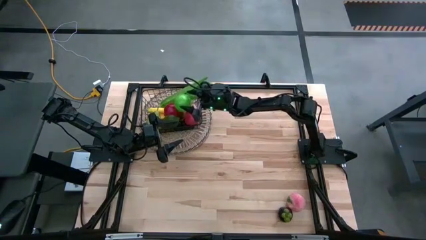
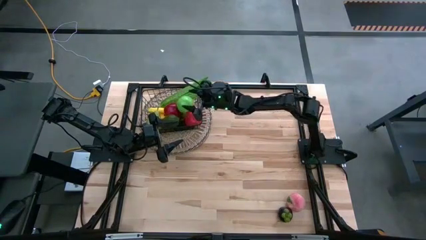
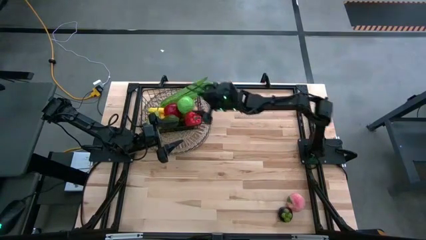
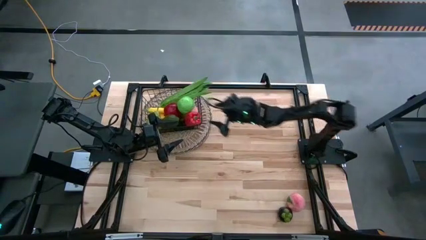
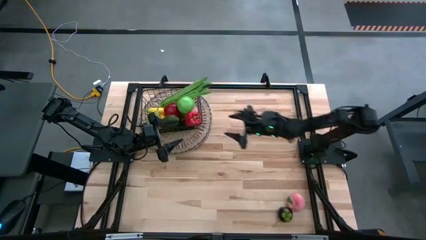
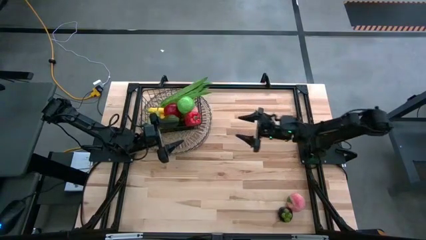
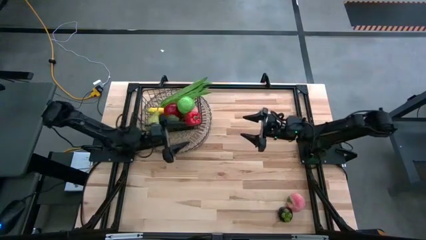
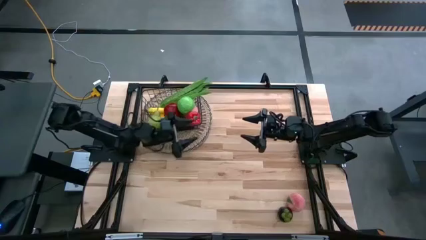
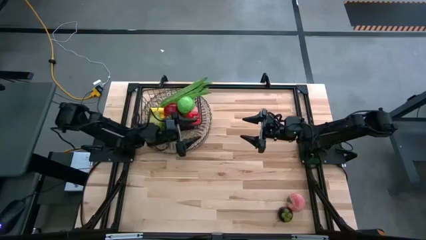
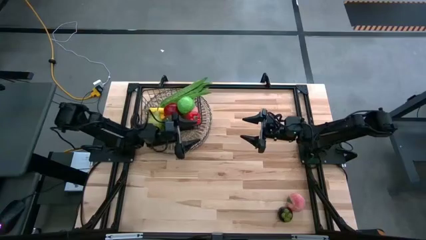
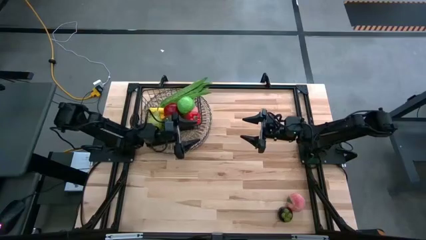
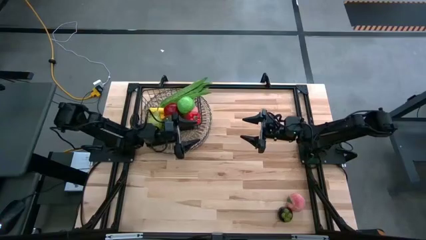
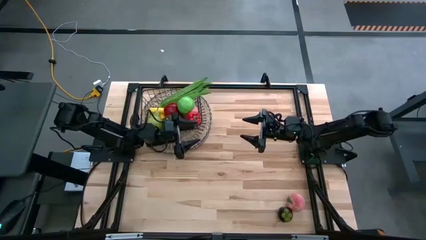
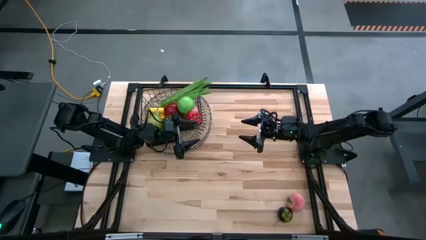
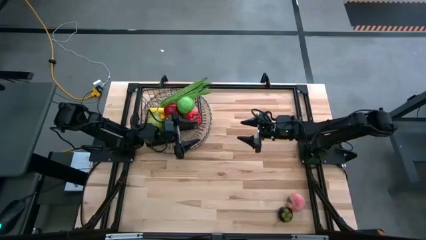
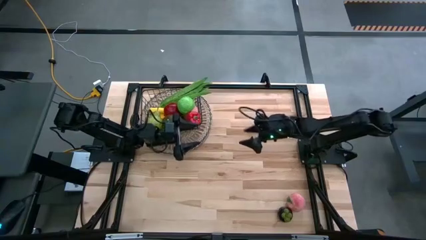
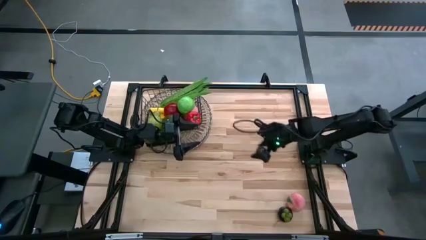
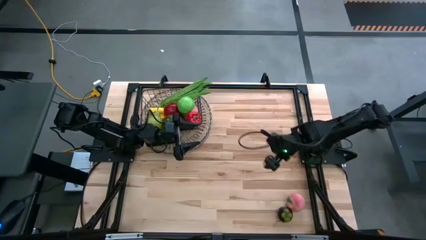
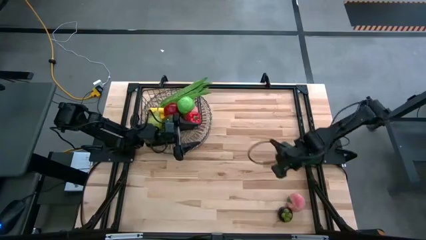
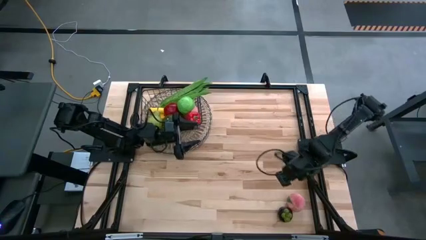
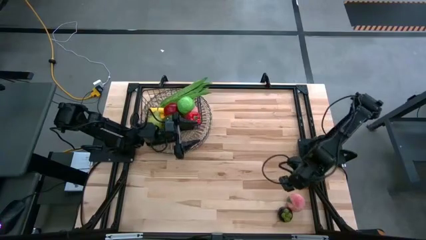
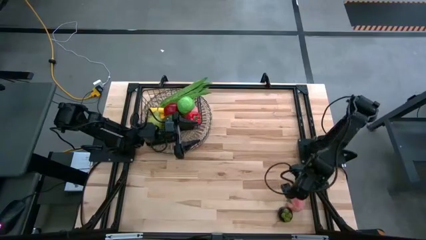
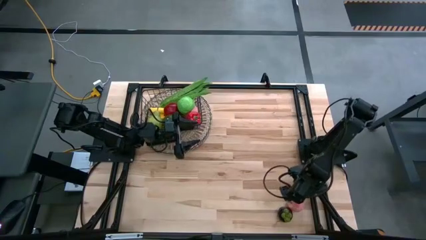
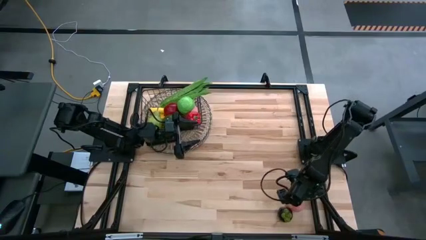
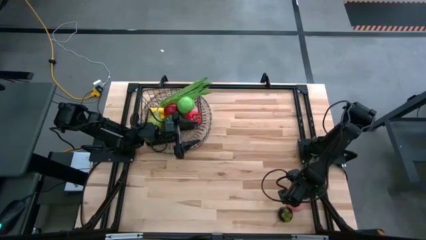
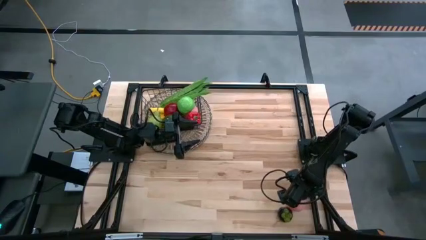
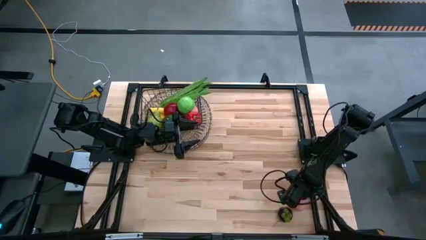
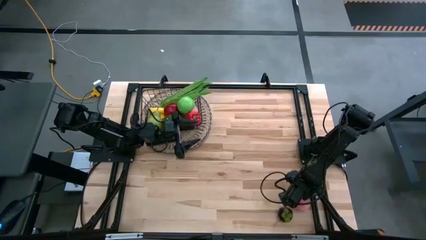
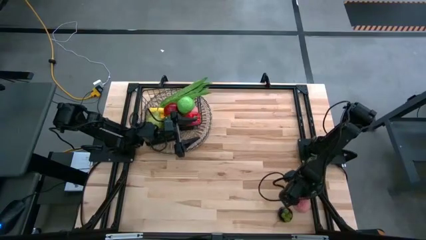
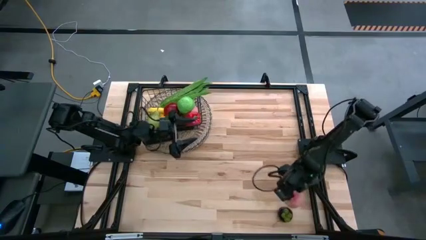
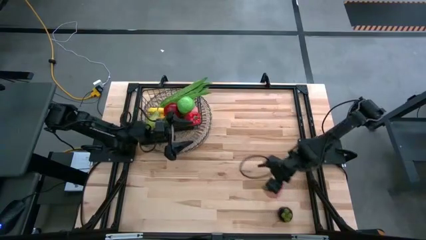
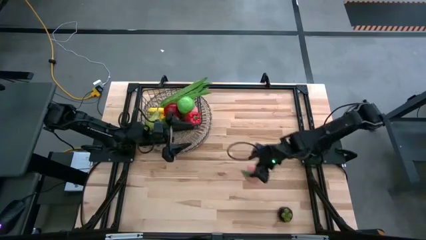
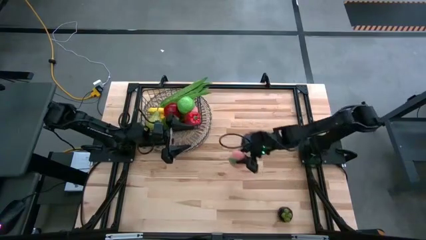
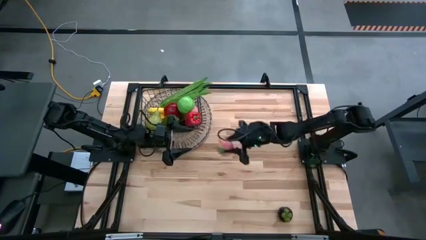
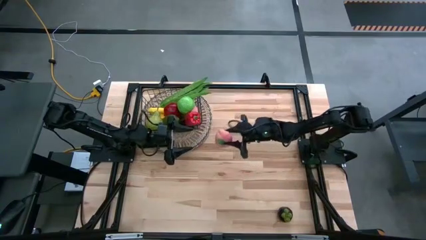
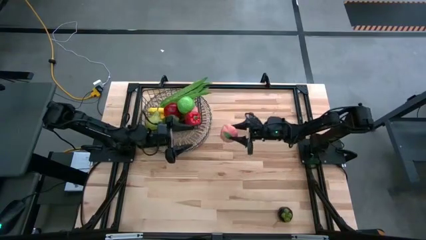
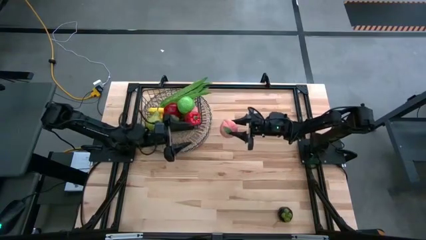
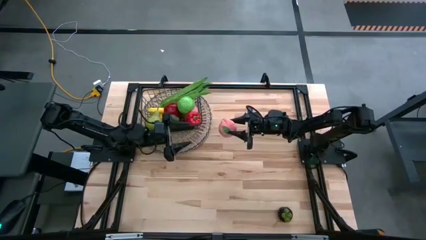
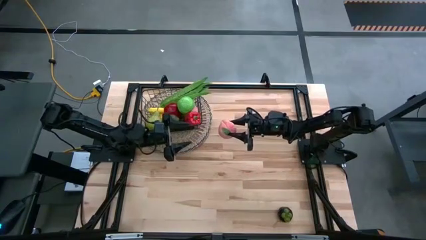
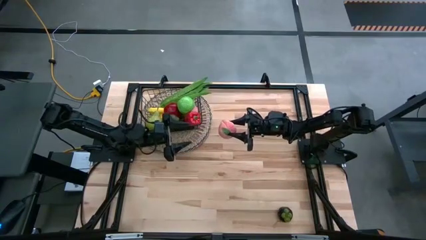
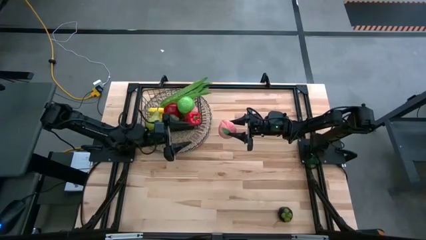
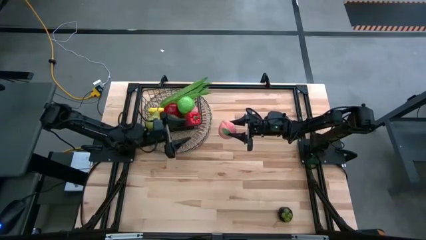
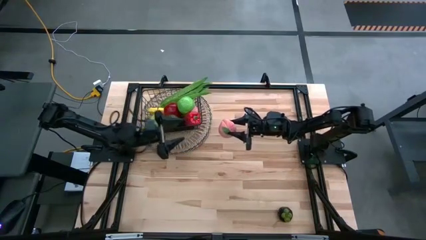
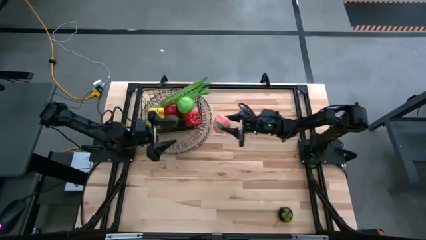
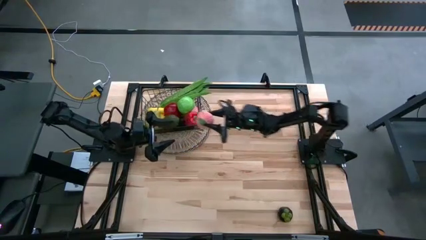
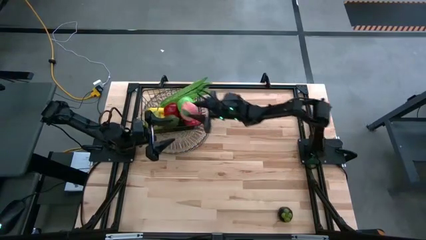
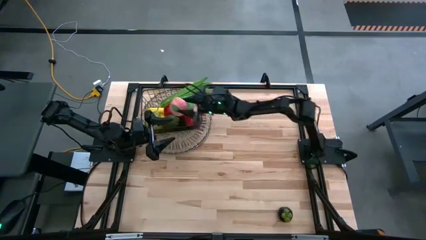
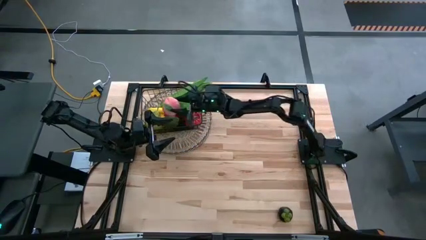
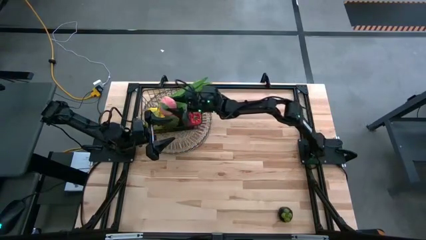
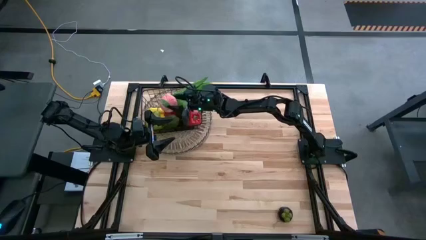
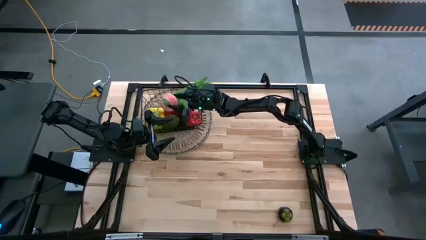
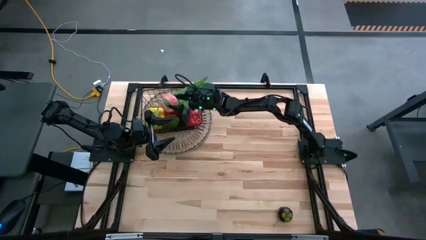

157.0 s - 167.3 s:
Task: Build produce basket
Put the peach into the wire basket
